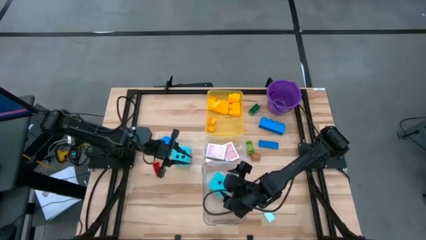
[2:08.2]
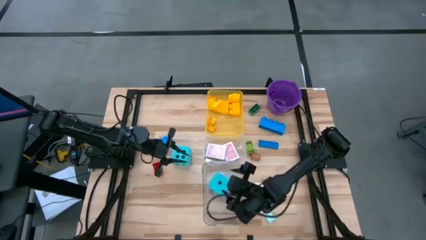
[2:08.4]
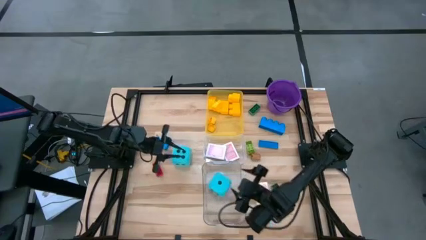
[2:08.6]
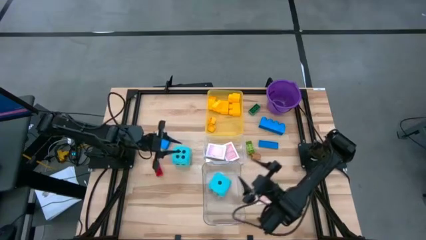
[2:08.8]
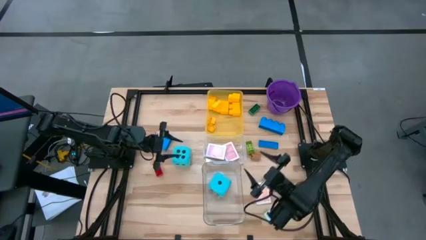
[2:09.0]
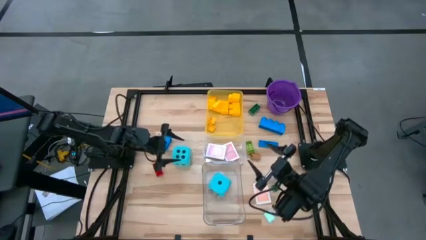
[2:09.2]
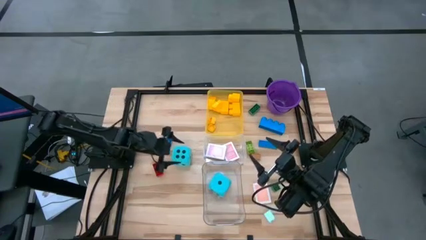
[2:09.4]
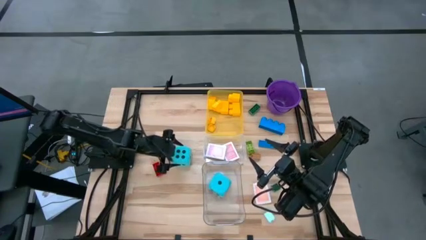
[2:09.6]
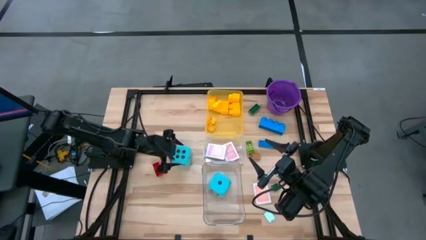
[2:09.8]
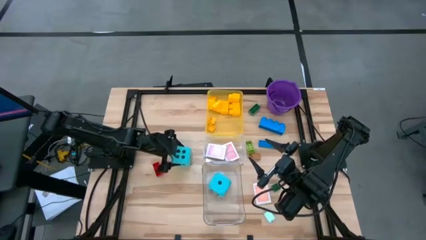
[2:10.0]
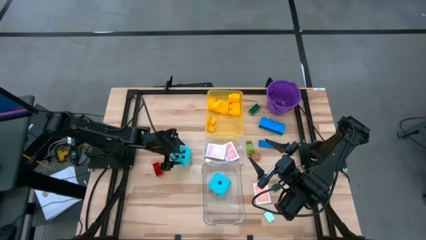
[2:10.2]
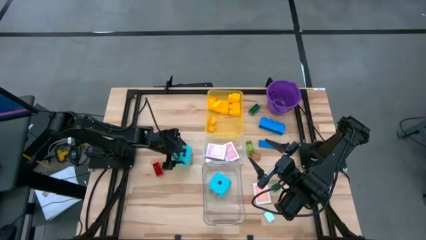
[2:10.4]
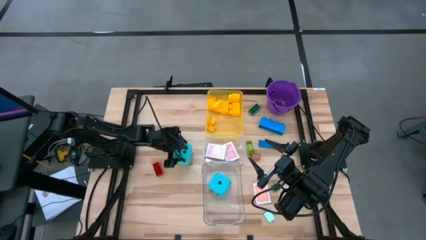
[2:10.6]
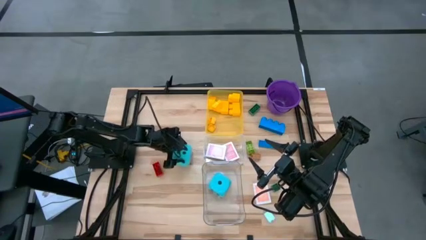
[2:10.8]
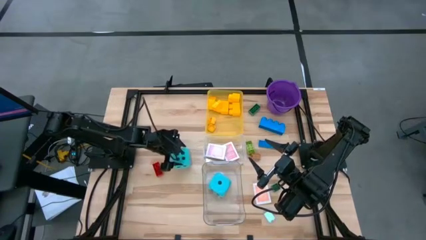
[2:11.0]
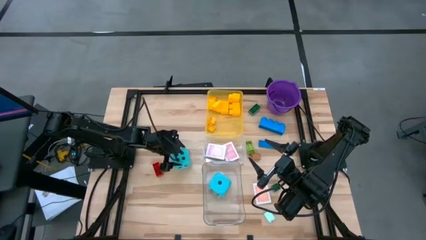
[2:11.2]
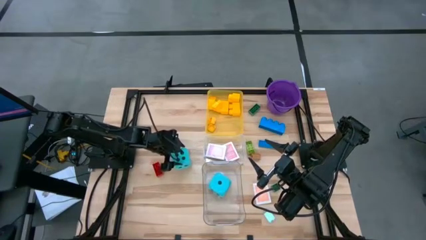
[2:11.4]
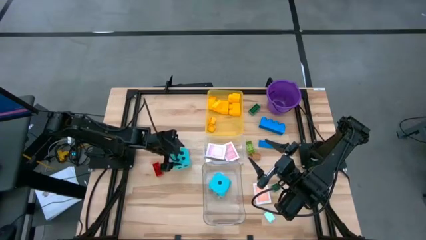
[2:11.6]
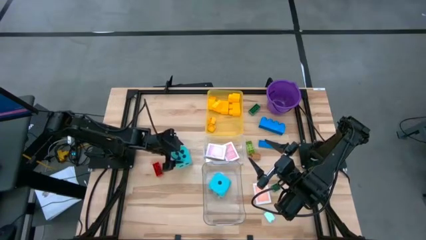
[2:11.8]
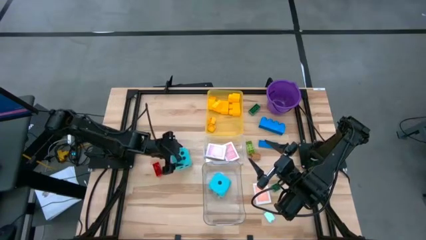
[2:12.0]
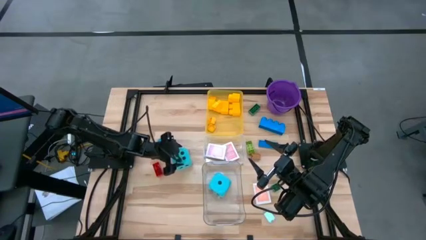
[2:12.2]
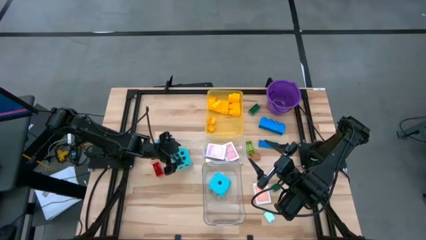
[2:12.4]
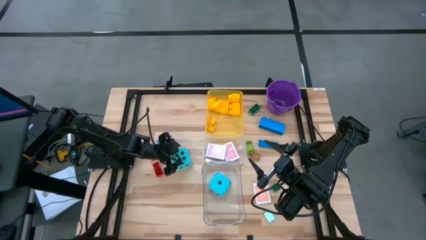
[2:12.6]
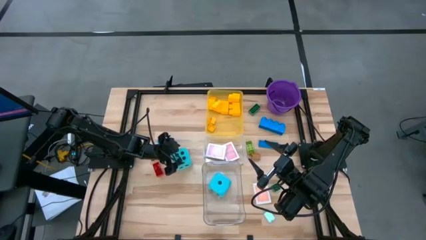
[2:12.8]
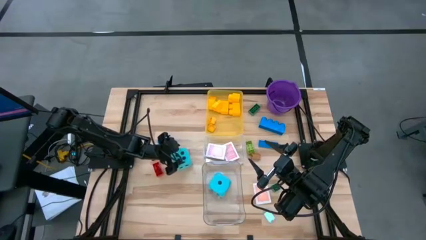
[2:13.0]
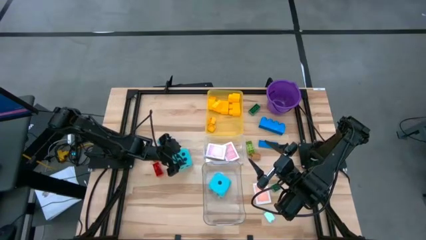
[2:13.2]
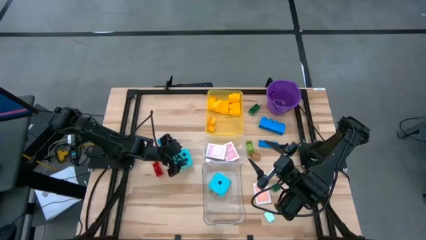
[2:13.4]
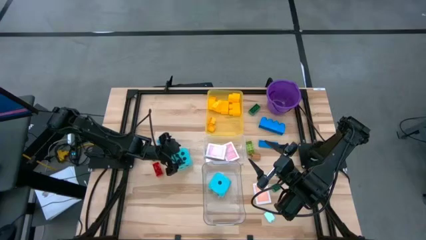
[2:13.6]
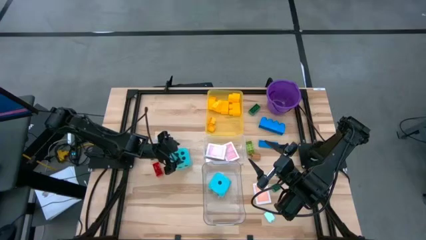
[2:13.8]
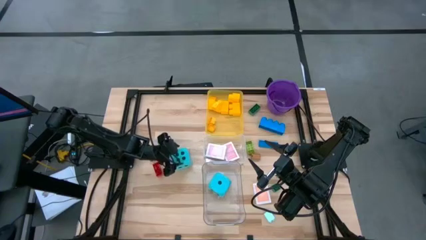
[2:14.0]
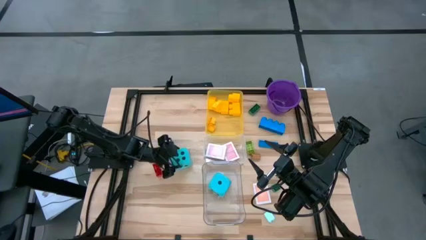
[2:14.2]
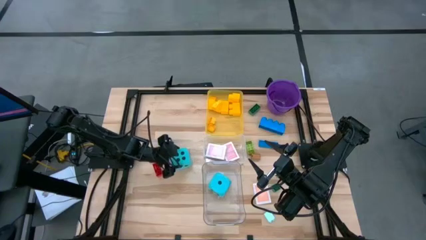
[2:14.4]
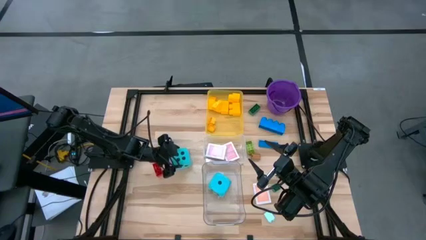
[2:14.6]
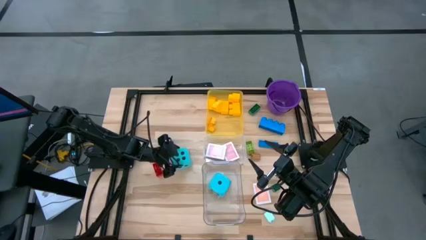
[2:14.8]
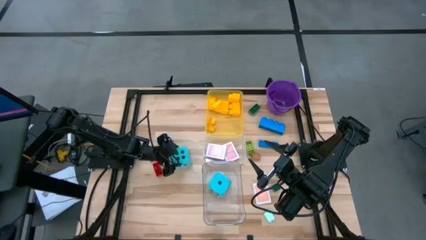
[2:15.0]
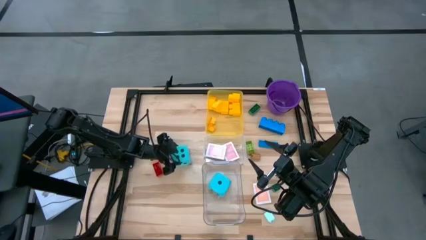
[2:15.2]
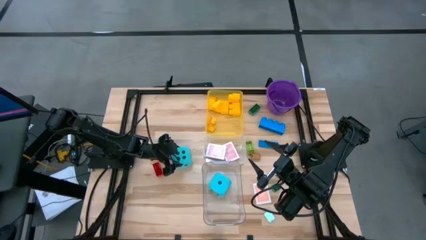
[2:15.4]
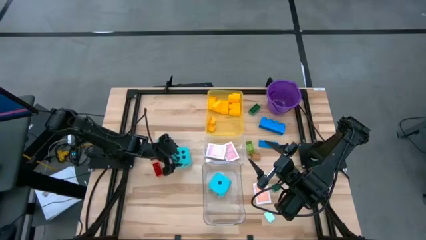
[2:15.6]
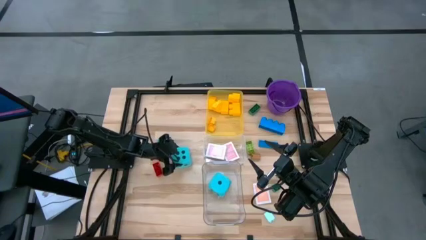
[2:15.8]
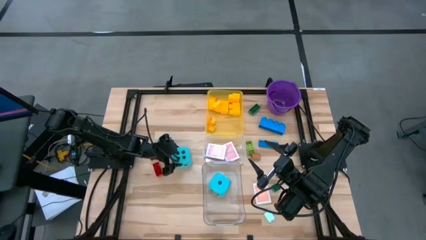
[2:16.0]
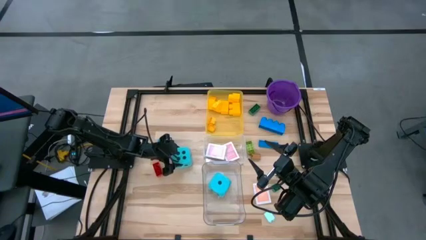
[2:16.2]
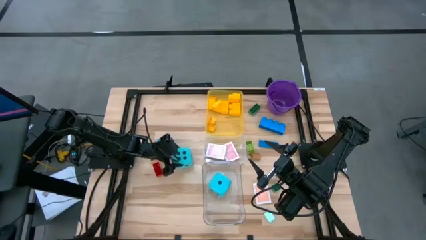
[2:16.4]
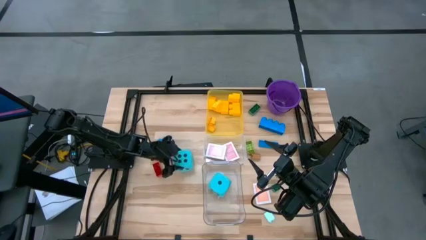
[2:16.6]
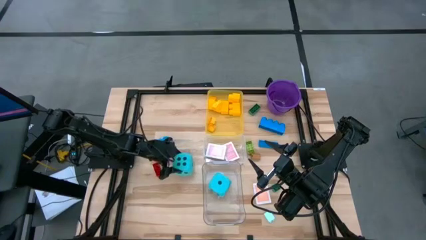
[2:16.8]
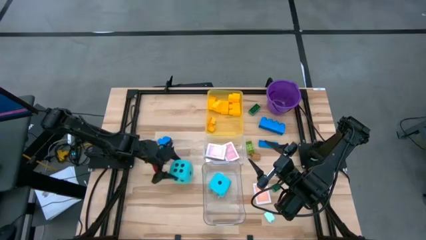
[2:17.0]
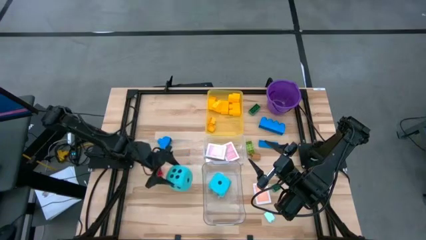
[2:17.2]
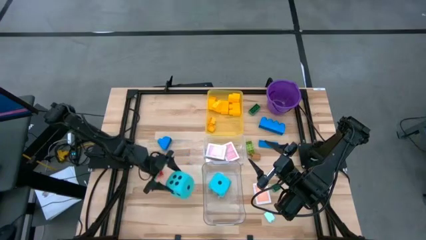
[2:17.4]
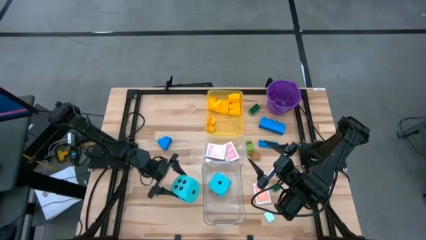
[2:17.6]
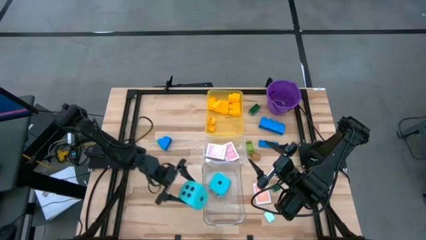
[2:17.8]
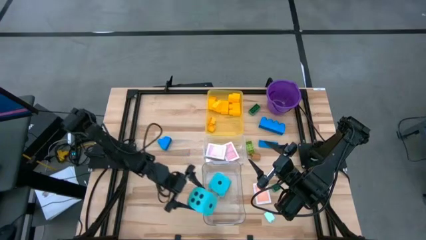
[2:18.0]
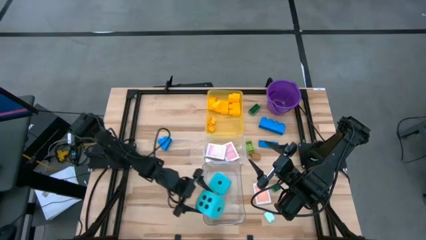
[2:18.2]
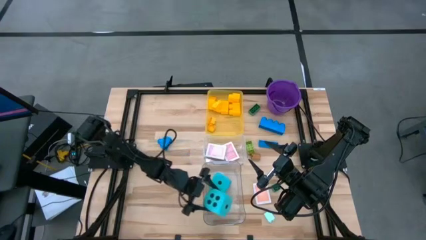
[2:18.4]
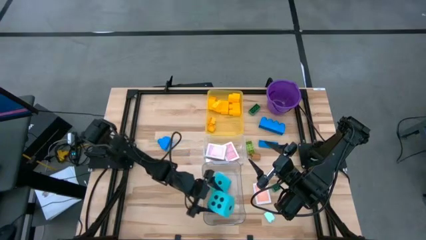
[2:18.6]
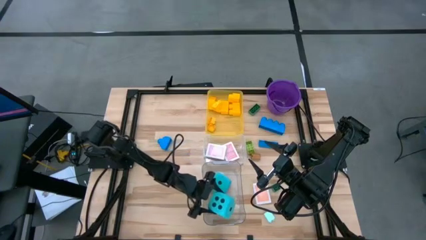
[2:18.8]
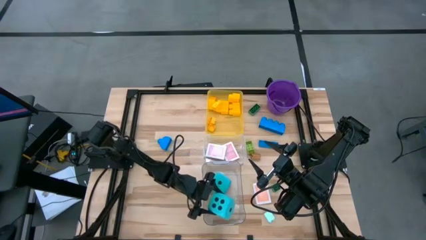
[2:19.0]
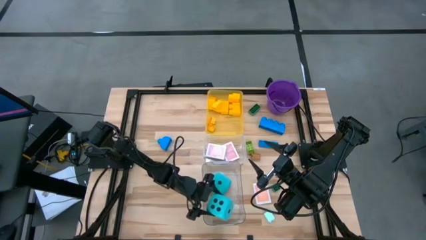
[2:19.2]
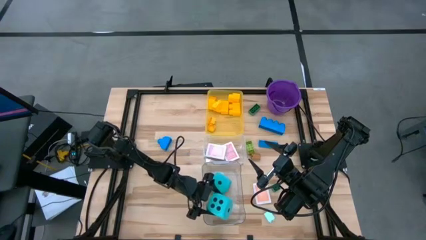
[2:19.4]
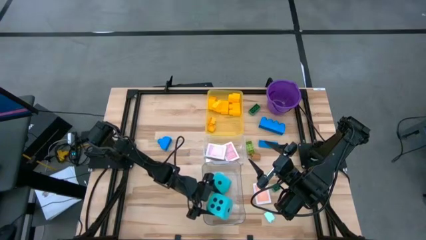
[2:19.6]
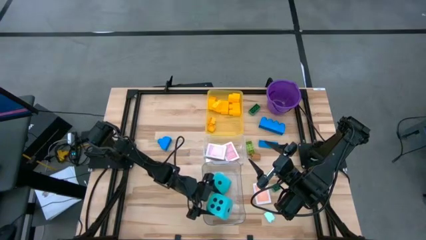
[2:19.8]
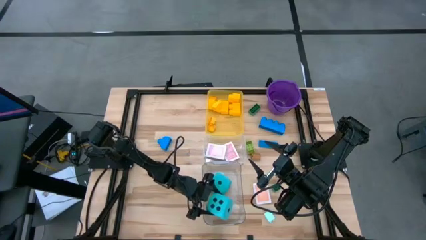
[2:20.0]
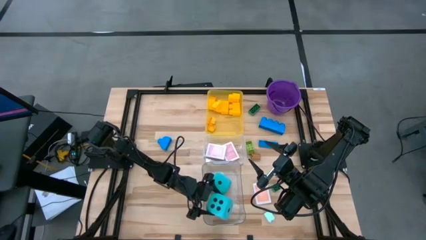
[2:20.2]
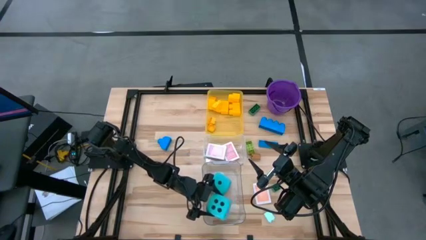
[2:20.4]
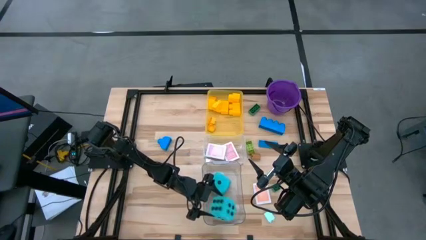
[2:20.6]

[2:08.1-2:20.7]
Task: Pick & Place Toys
Put the blue dice into the bottom transparent bin

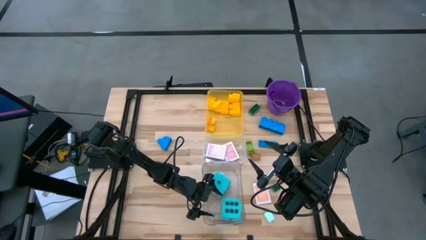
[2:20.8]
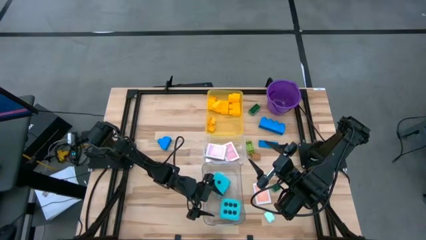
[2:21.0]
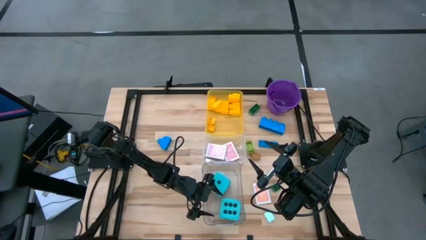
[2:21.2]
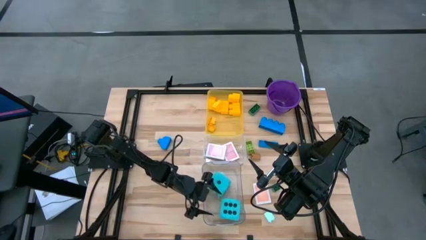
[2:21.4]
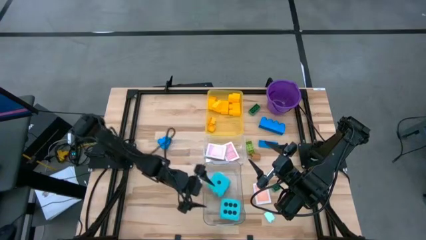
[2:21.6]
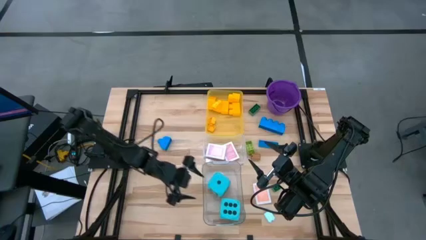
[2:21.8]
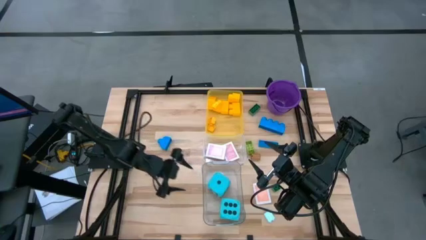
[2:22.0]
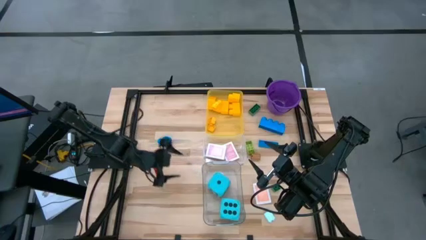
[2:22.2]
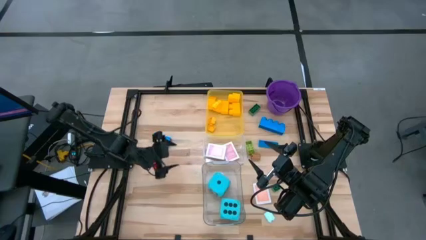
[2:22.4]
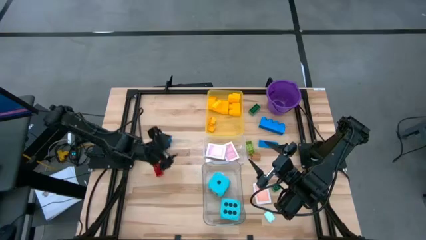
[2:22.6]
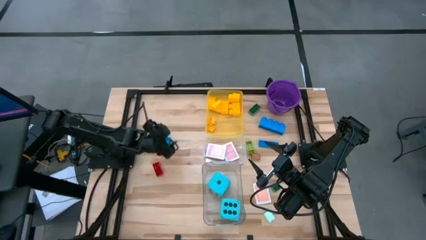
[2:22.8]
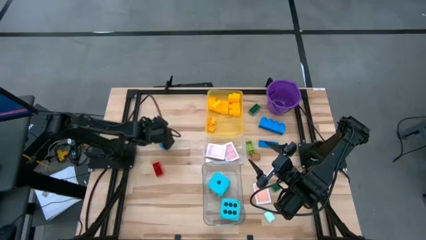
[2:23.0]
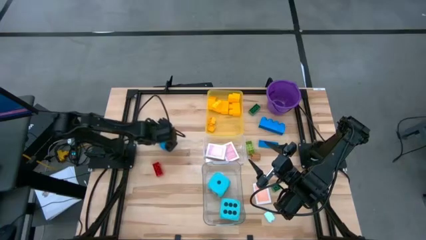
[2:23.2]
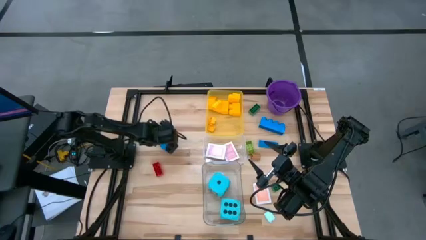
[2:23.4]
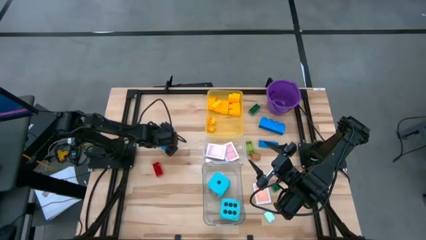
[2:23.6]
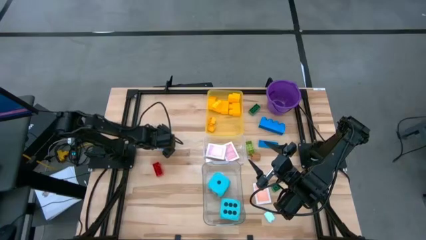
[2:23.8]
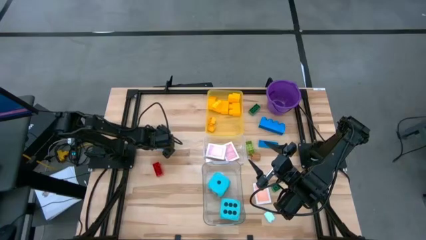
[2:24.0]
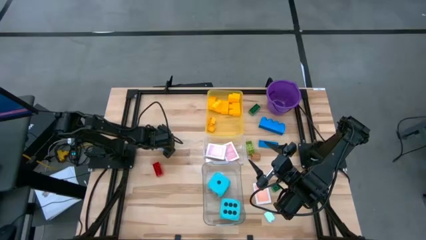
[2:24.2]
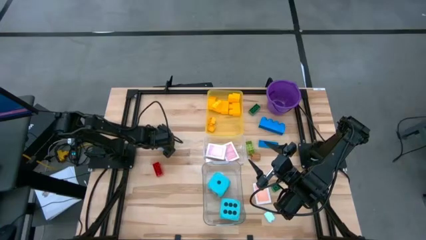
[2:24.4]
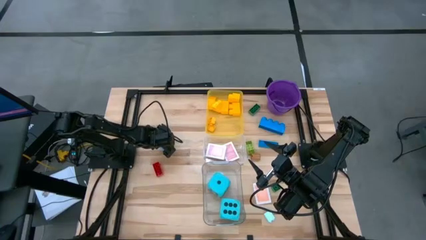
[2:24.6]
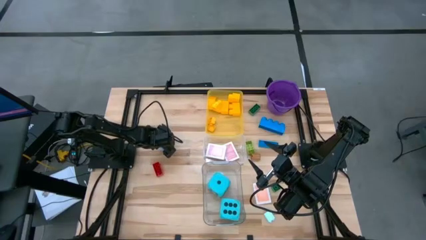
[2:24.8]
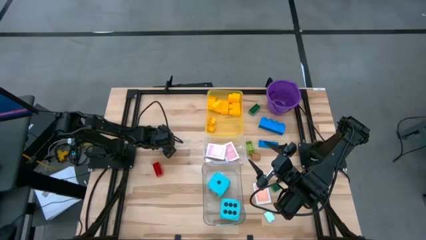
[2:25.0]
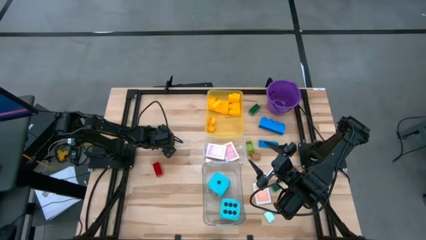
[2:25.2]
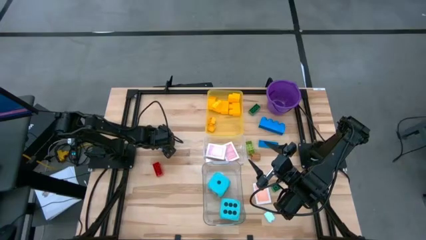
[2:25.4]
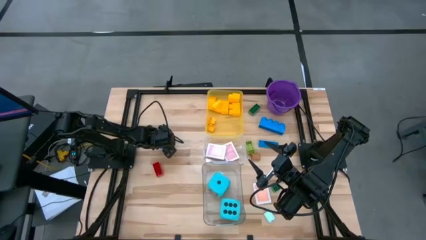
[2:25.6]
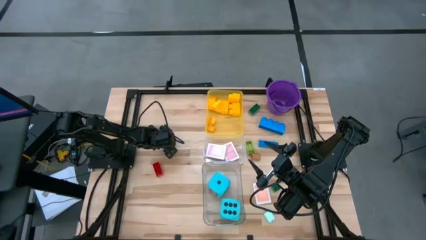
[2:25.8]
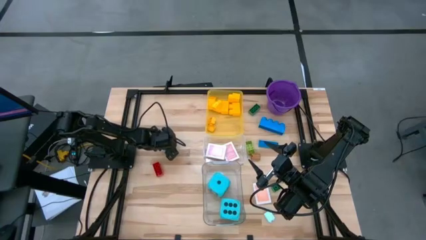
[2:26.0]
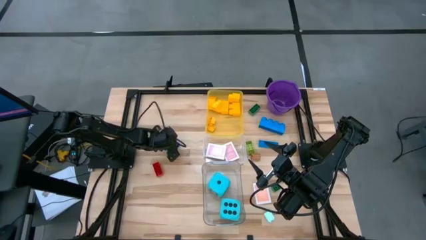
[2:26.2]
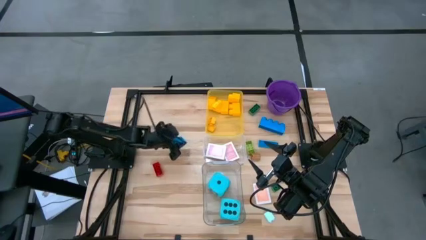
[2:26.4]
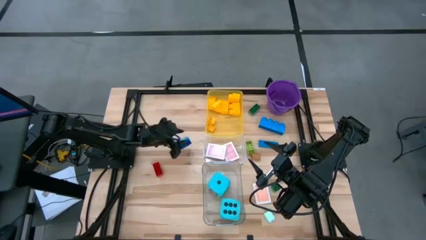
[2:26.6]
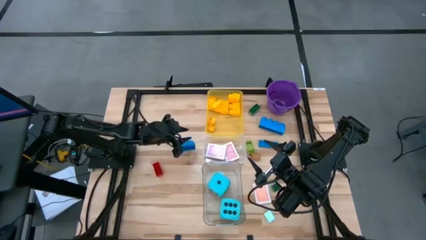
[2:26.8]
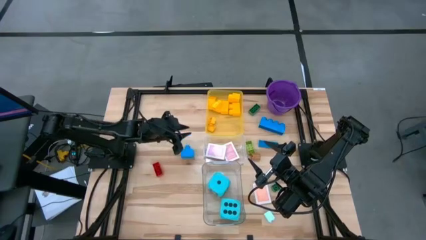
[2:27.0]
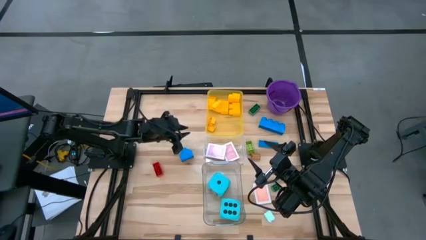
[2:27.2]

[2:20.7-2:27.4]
Put the blue game piece into the yellow bin
